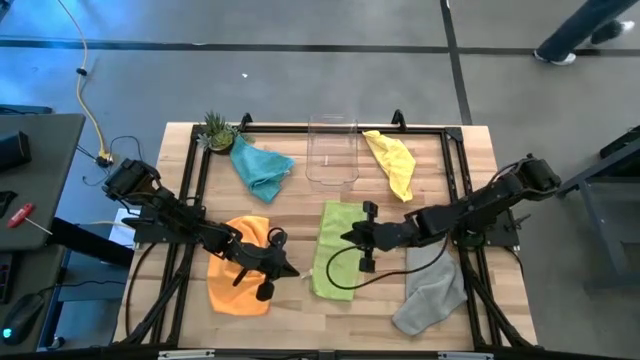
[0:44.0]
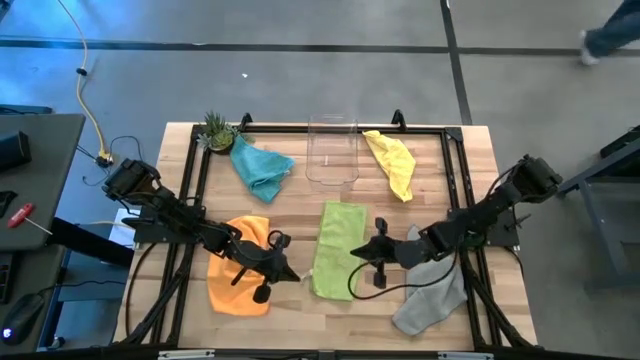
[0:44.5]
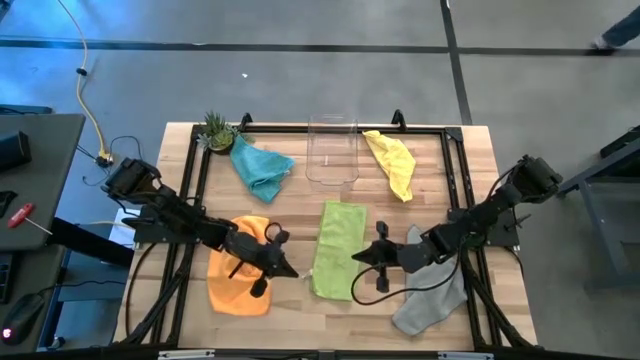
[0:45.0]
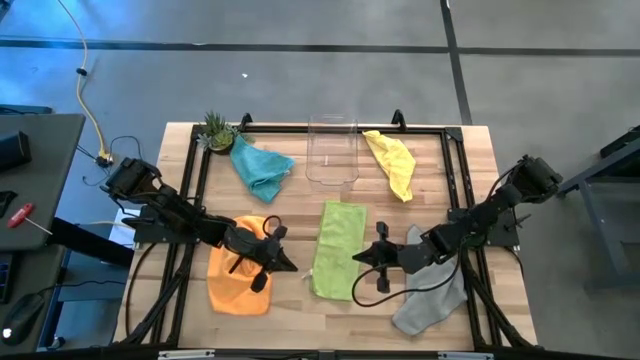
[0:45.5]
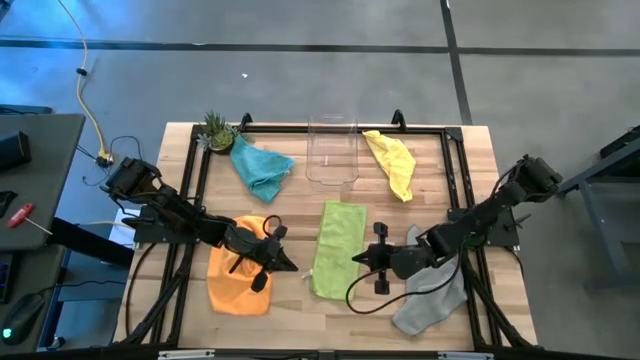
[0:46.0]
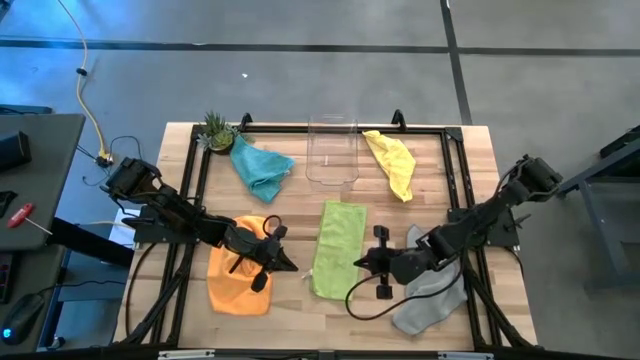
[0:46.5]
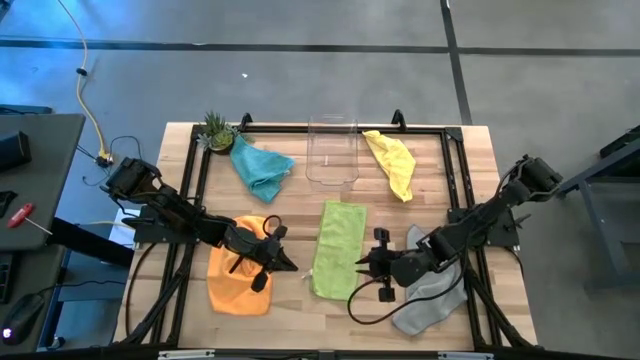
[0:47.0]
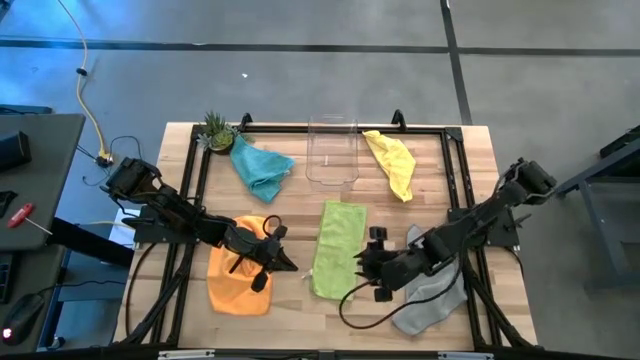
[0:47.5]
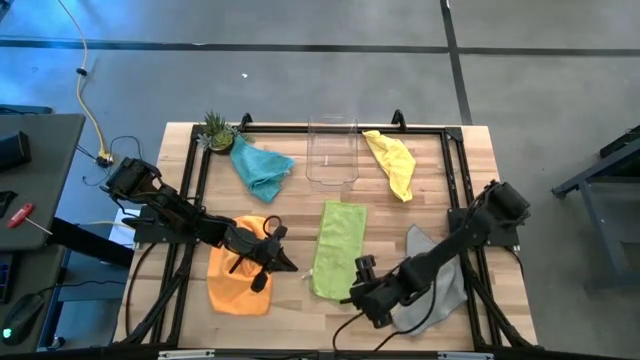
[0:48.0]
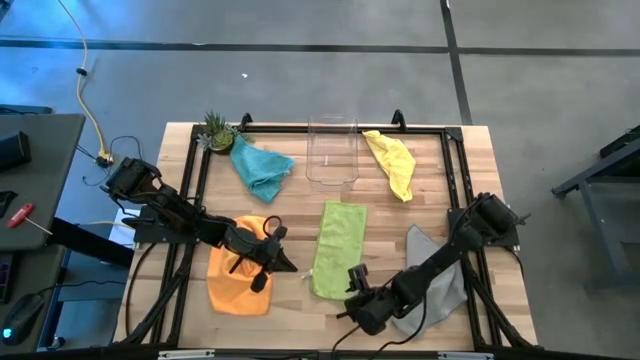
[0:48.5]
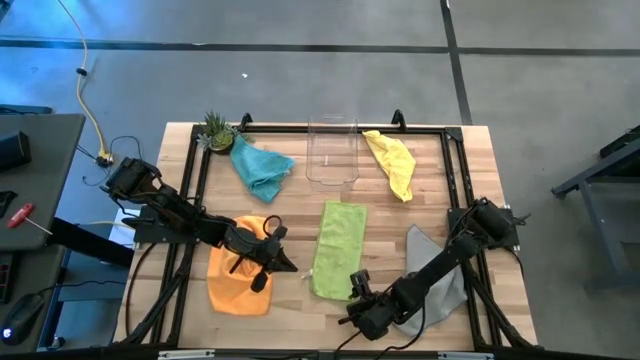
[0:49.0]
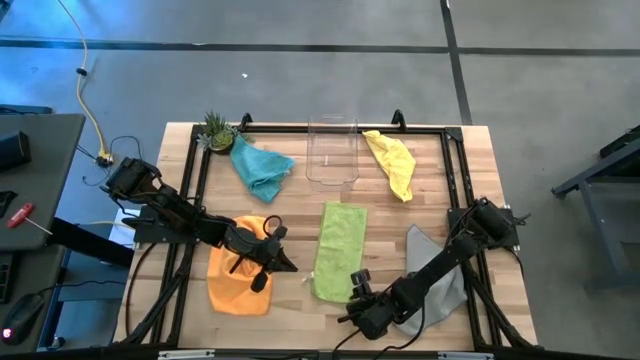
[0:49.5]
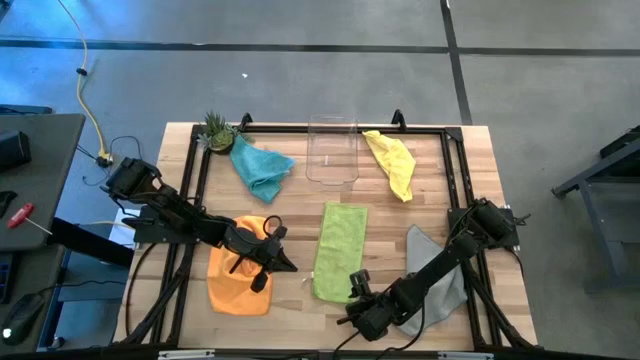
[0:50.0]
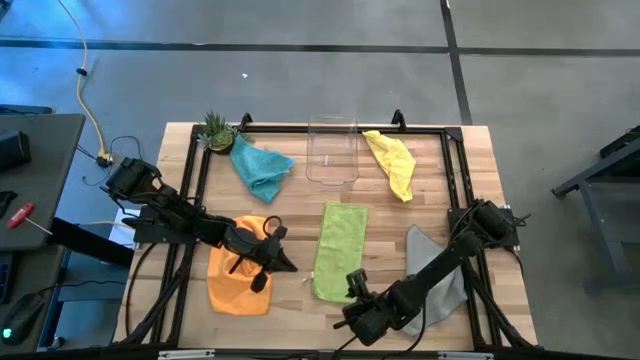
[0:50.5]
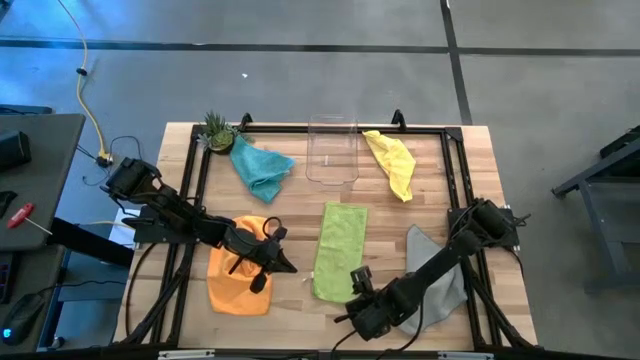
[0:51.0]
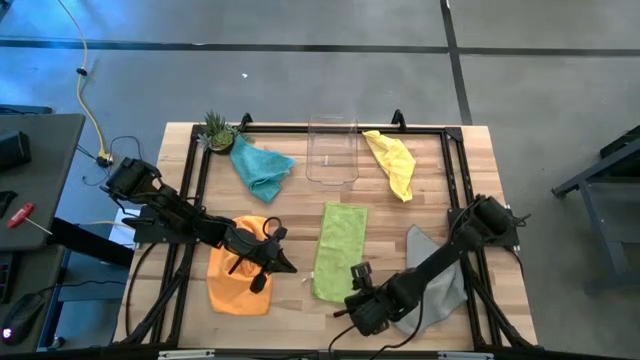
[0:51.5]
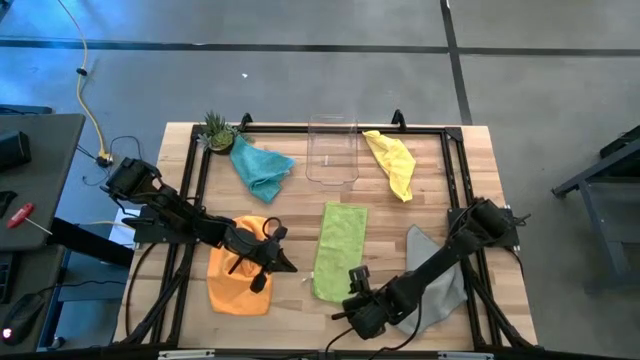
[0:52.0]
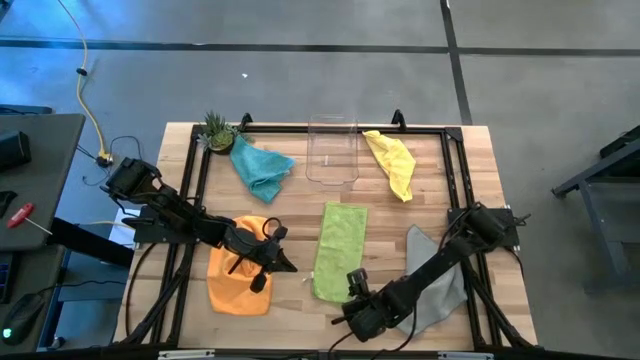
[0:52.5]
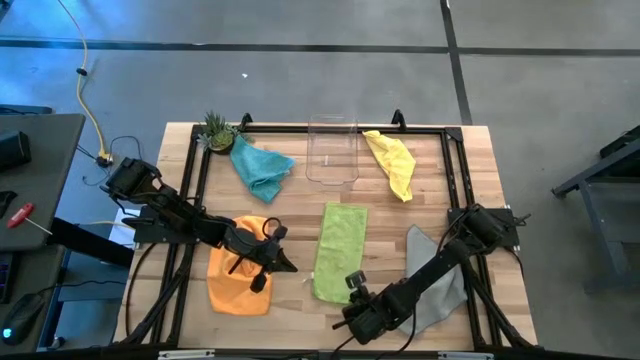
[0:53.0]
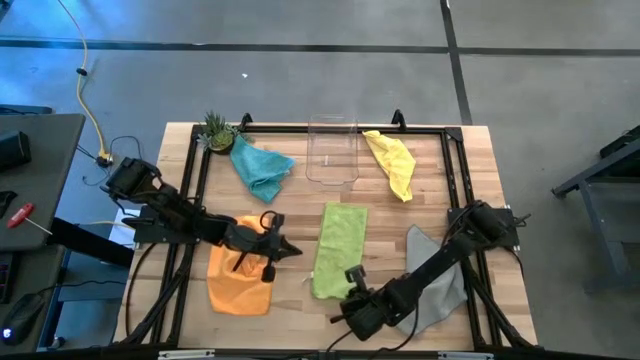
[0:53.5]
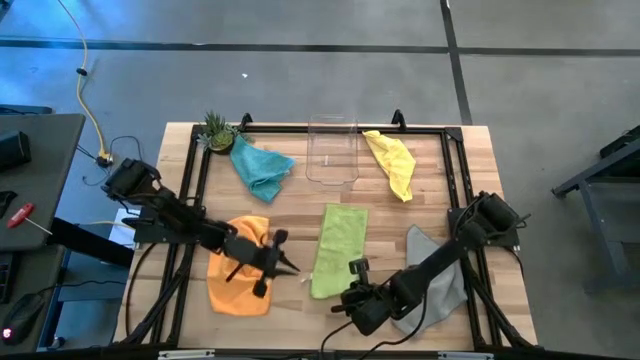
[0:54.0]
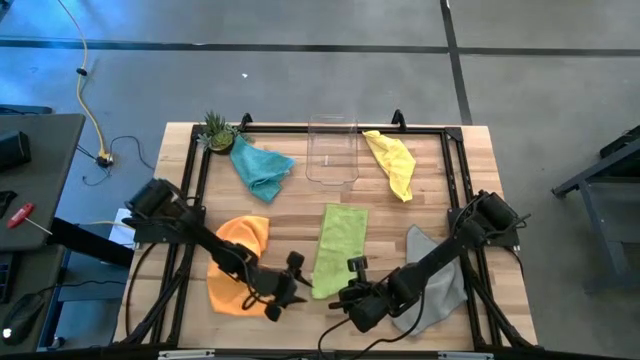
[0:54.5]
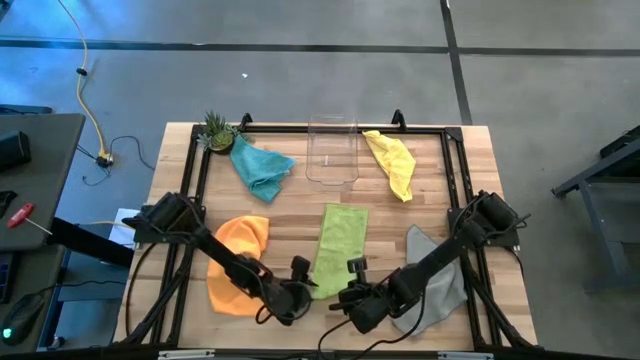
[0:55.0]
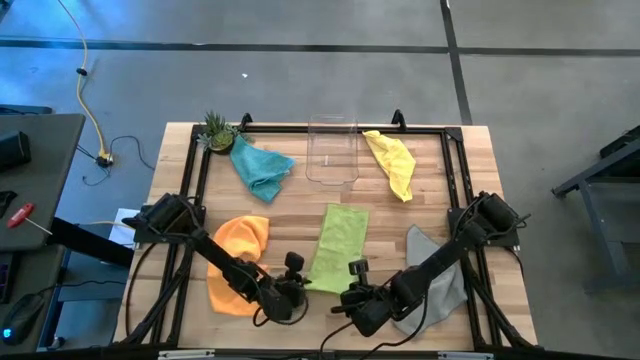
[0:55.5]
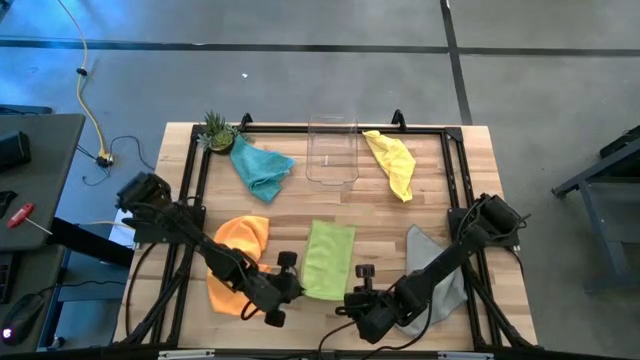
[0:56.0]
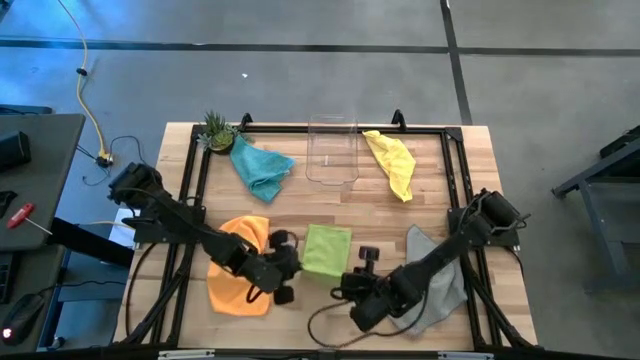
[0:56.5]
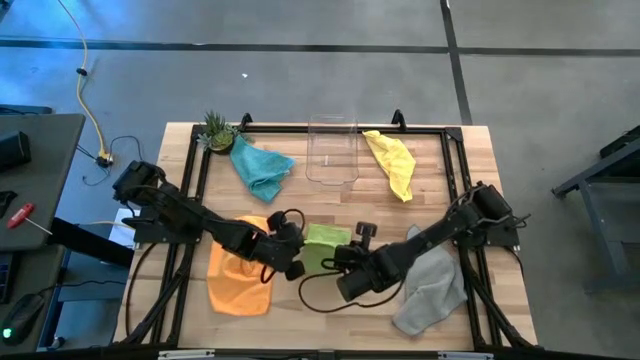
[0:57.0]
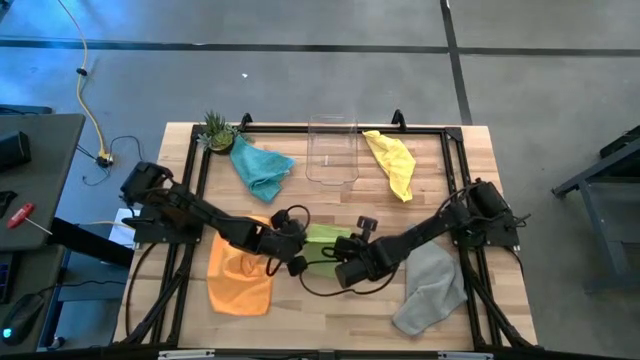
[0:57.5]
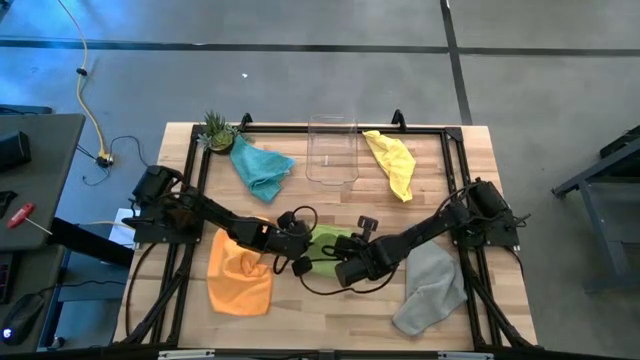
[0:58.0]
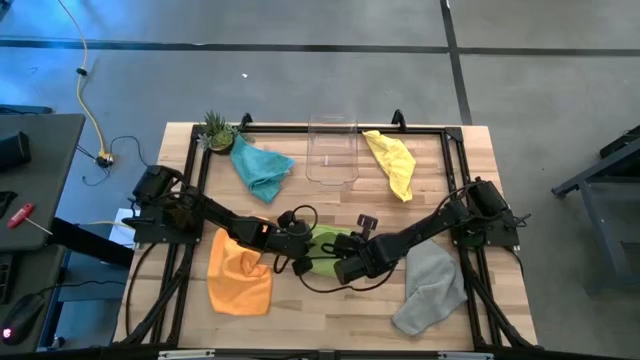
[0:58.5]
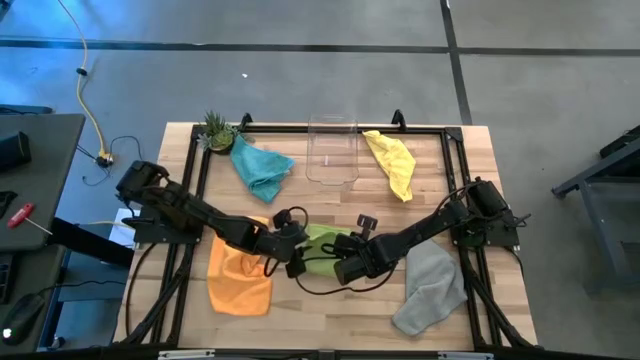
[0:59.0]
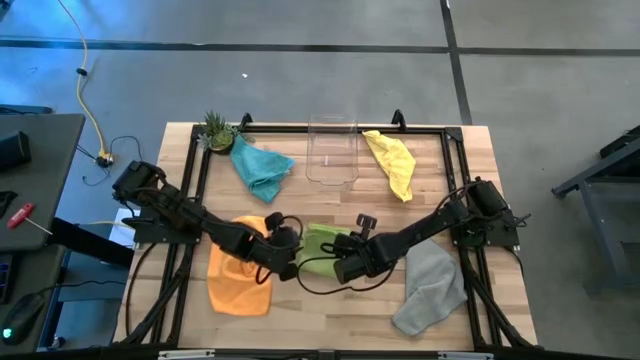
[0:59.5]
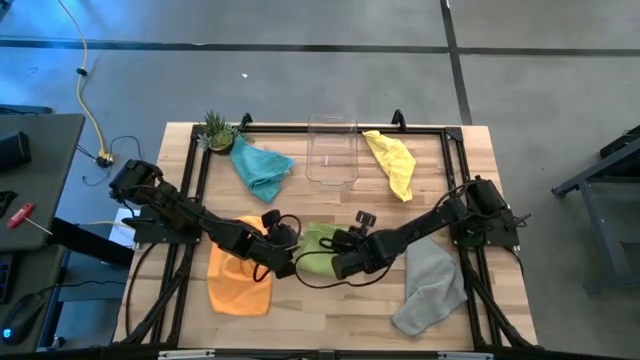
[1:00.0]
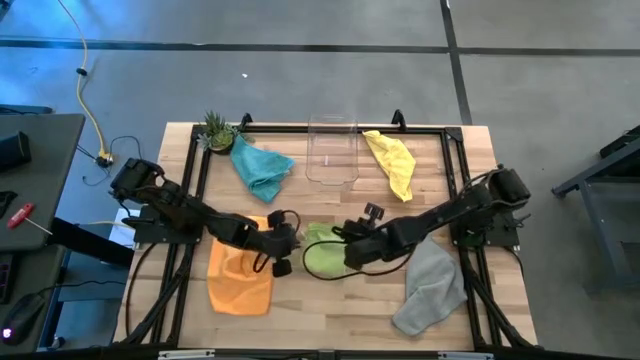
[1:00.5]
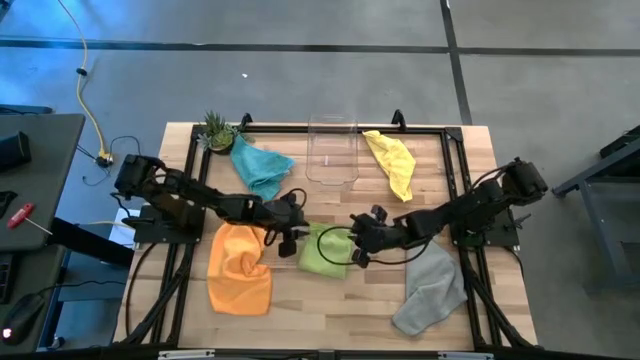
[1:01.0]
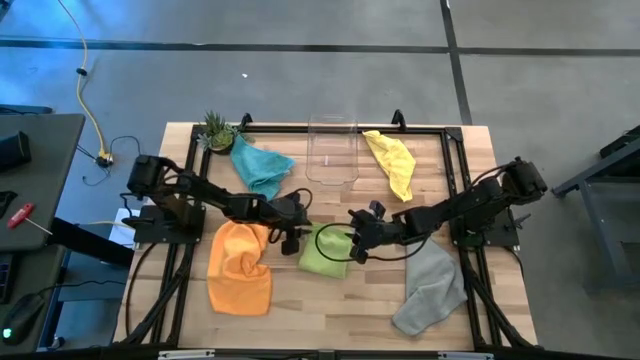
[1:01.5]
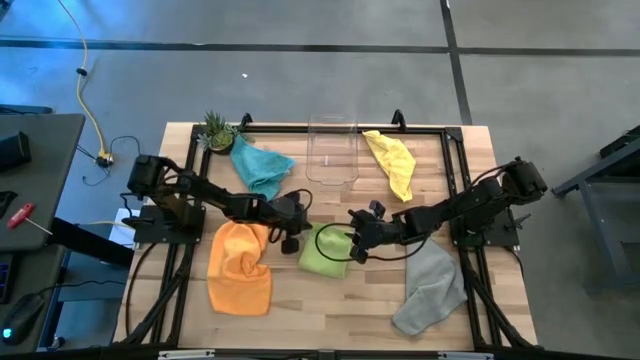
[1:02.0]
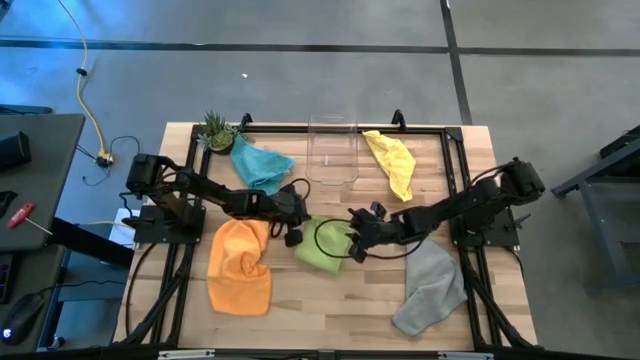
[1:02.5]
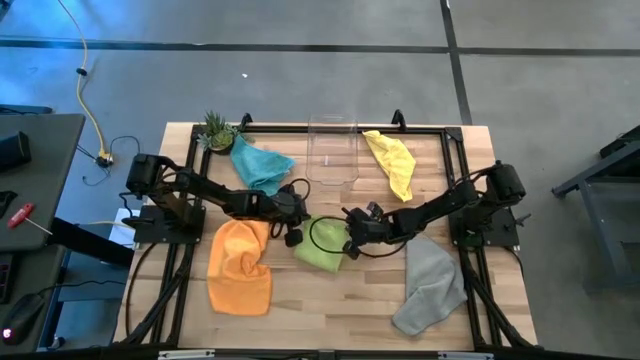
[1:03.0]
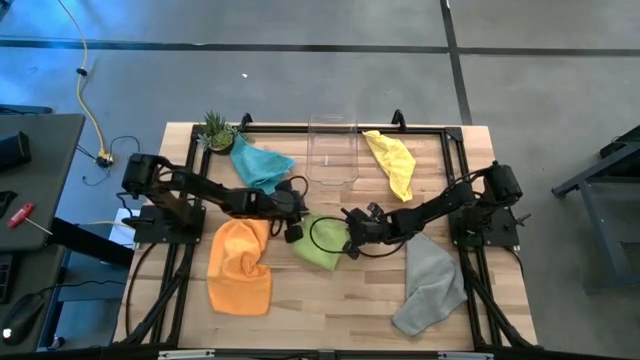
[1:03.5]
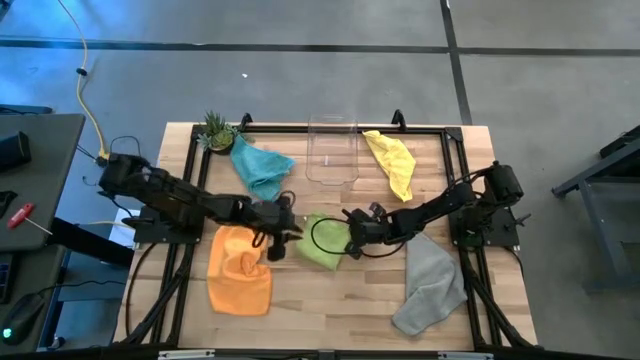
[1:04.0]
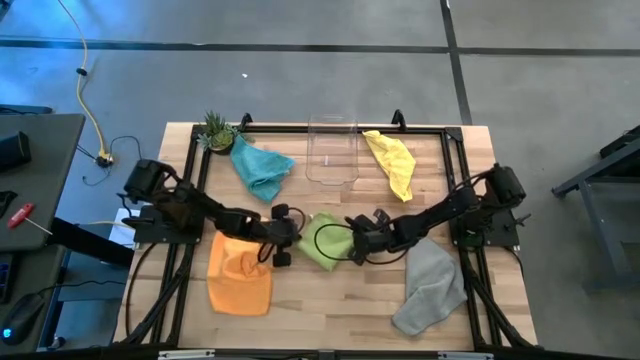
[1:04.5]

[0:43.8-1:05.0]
Task: Fold microfiber towels
Fold the green microfiber cloth
